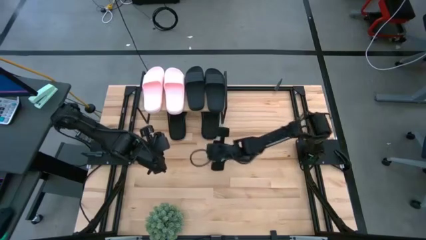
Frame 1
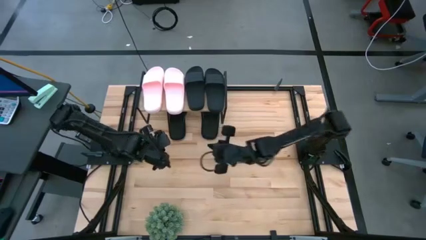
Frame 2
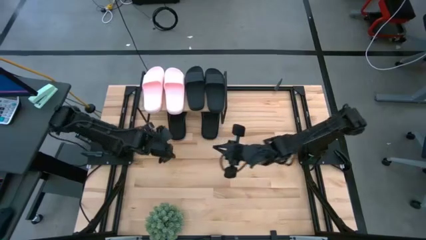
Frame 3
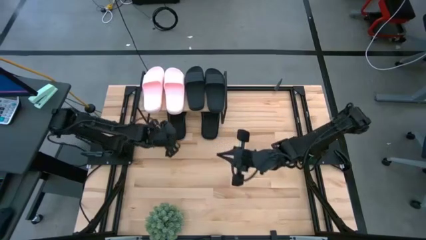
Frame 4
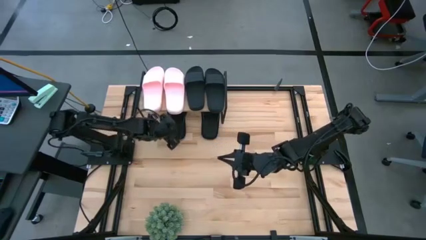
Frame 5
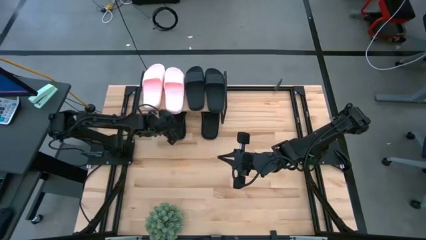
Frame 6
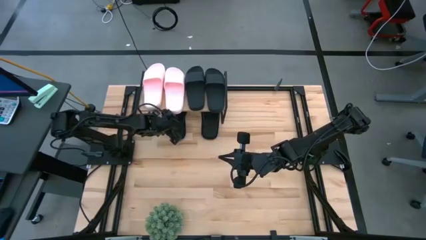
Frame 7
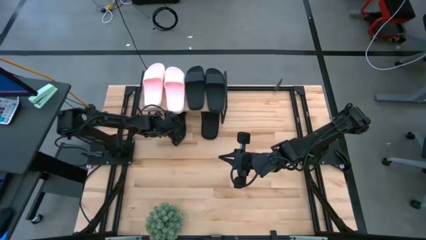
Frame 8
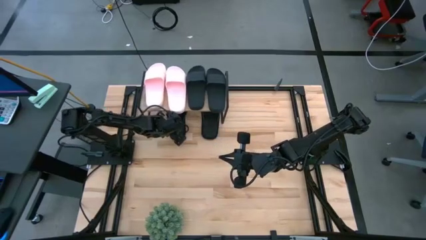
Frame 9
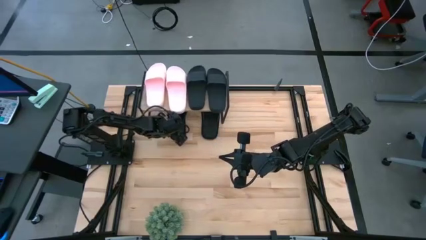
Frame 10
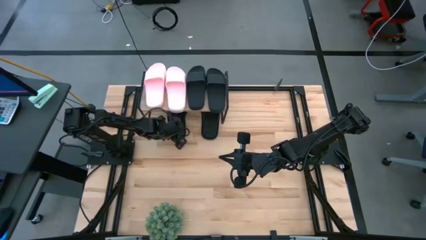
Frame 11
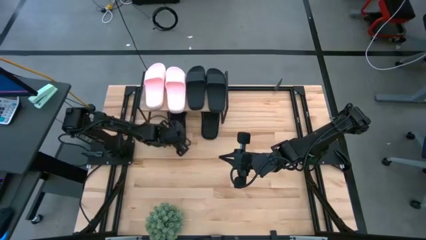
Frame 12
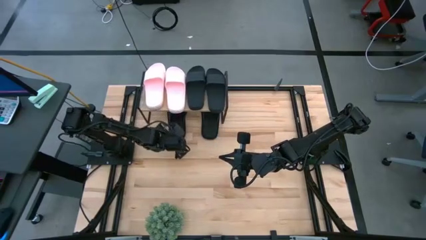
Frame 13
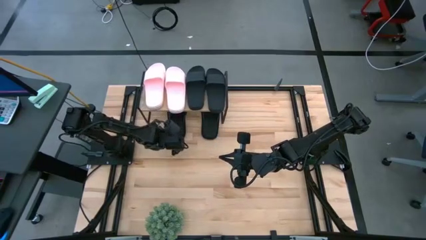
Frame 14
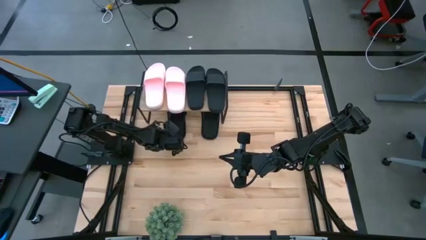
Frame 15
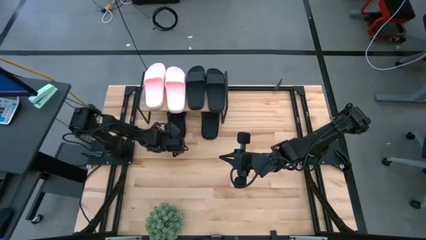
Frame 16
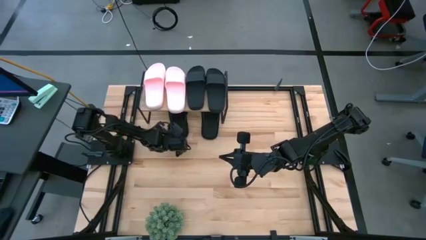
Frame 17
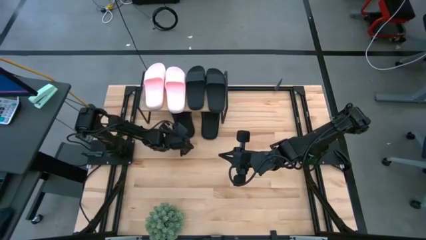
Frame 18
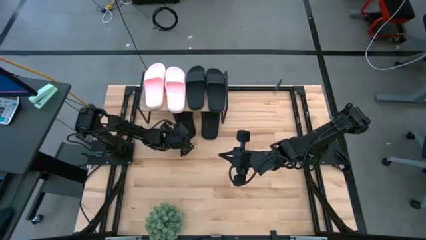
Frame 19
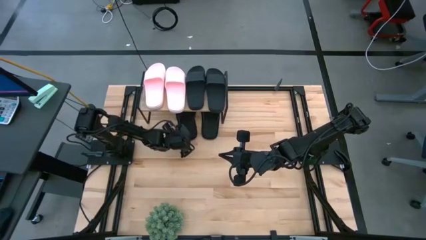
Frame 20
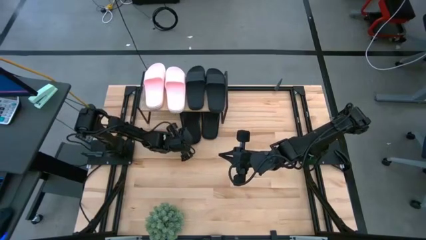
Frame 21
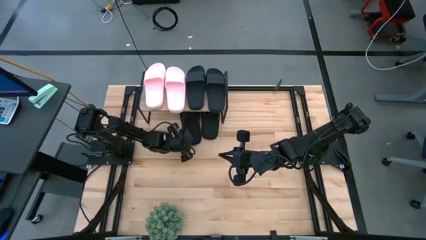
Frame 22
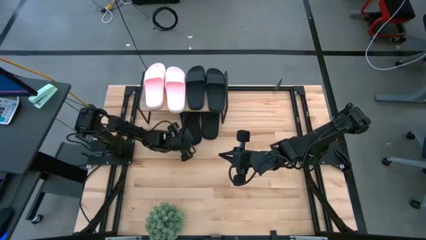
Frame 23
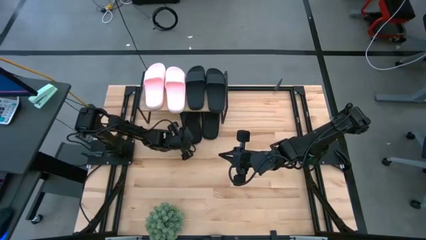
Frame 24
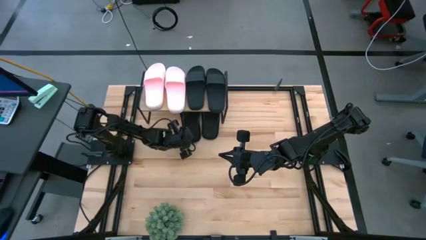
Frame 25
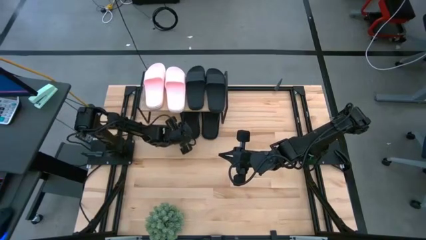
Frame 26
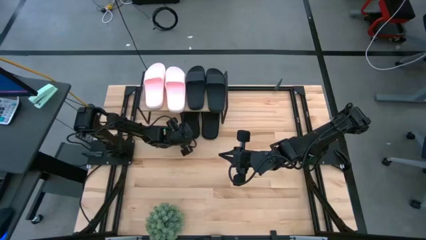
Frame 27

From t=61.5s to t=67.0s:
Task: Pick and place slides into the shelf
Adjust the black slipper under the shelf

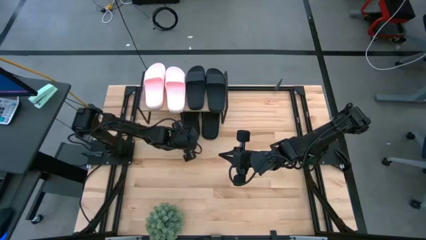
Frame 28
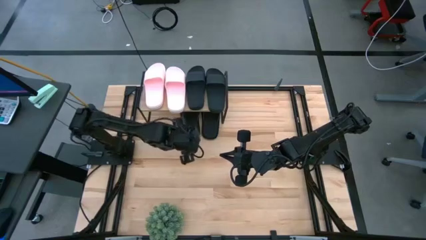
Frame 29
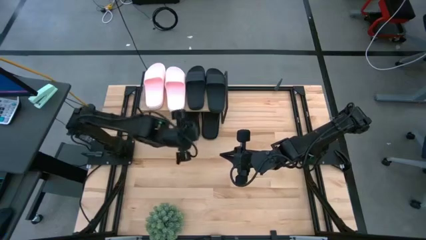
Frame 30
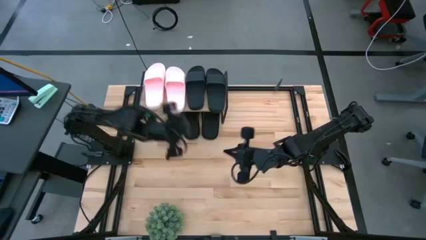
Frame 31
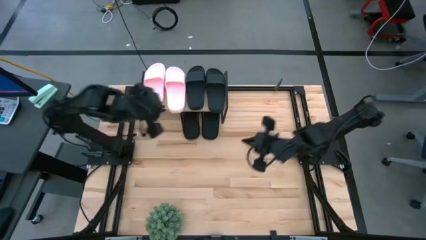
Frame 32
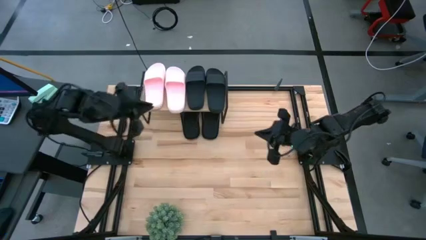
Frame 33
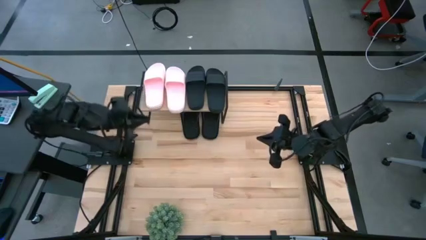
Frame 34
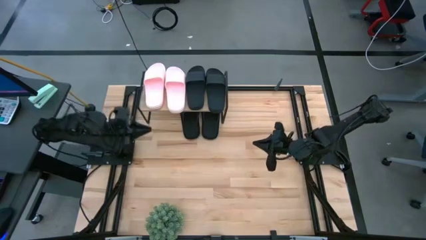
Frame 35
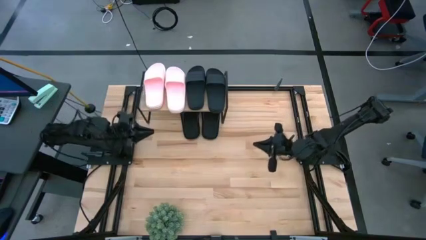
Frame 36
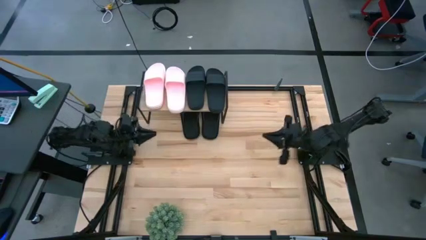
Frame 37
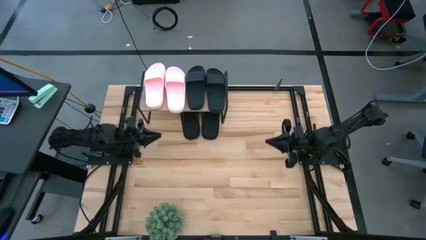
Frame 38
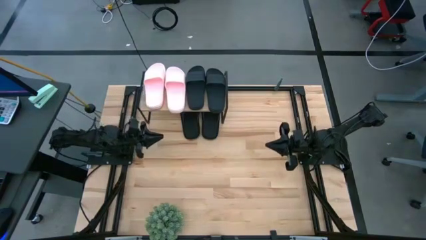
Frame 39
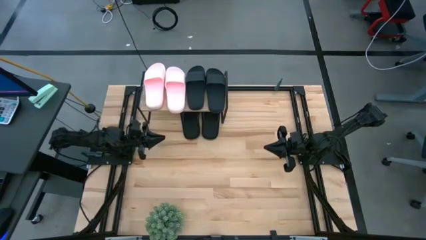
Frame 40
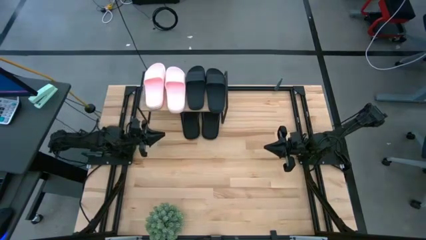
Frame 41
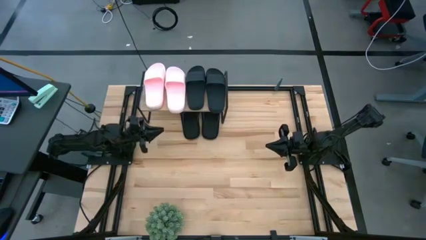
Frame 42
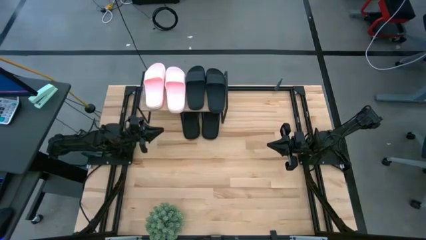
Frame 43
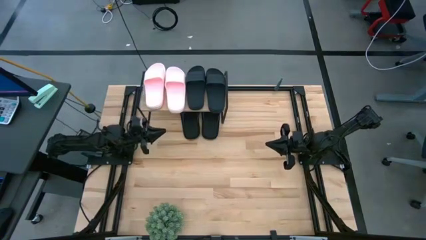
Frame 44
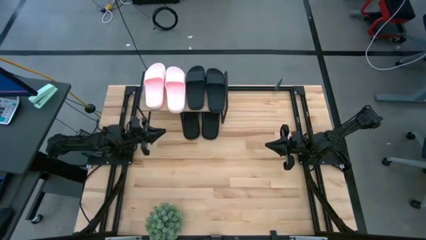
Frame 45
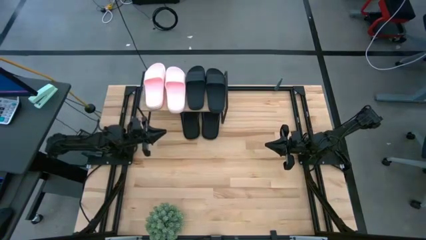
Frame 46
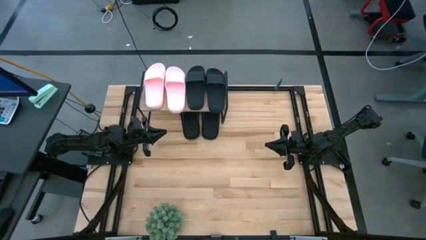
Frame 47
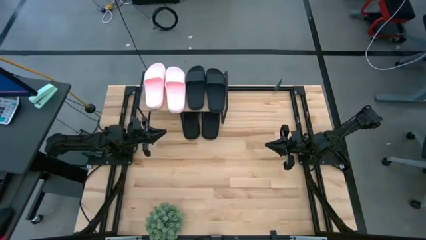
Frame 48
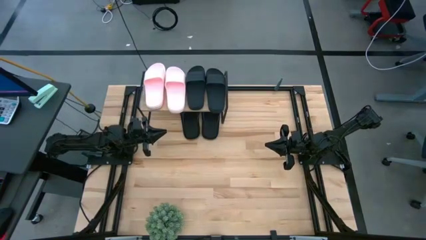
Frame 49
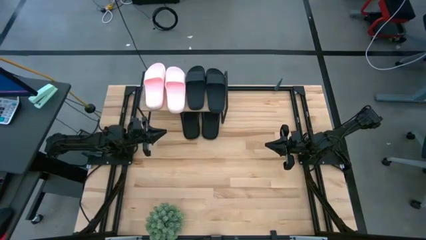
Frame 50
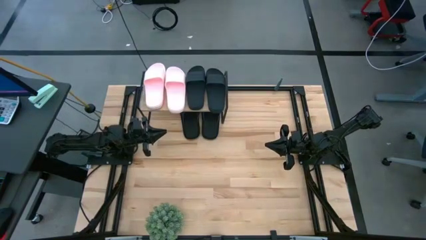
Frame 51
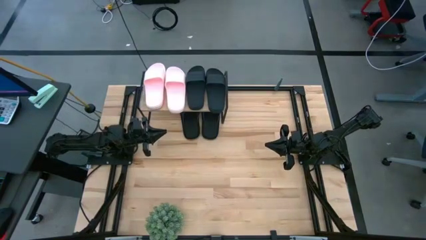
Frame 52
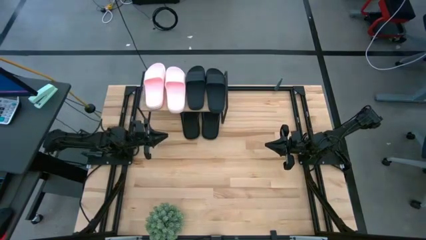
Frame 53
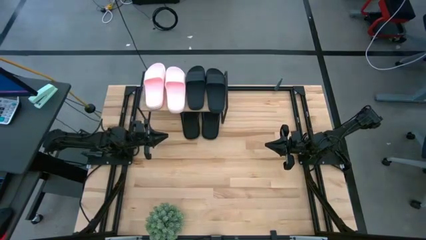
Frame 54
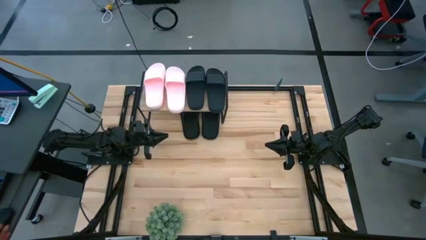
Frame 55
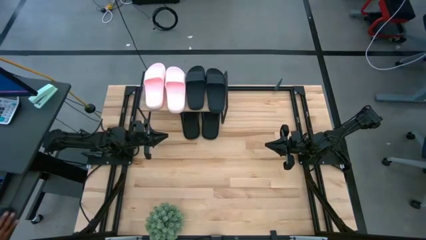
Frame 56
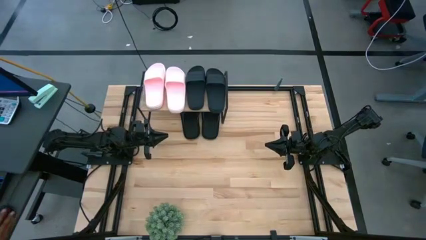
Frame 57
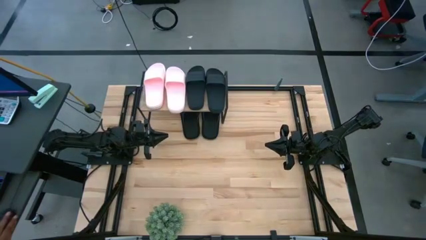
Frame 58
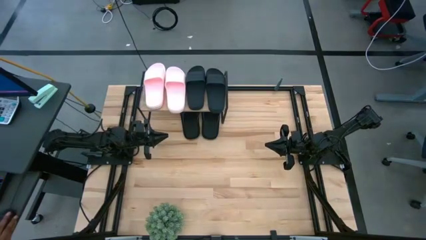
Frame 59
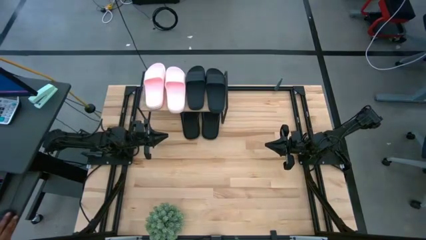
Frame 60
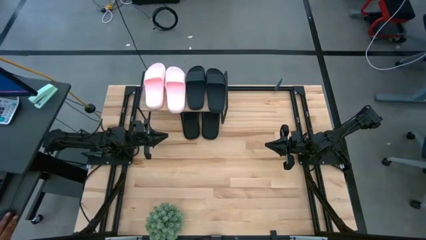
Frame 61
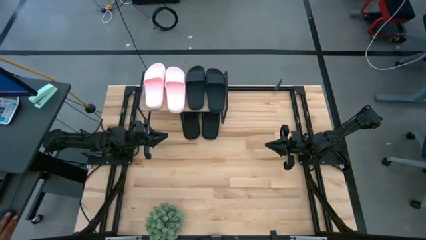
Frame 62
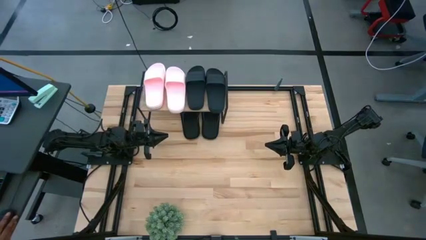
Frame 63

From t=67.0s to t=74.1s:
Return to Home Position
